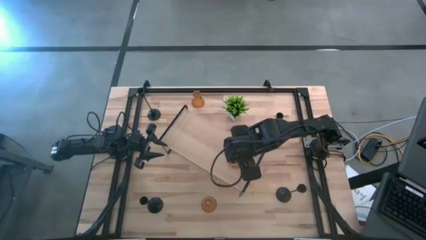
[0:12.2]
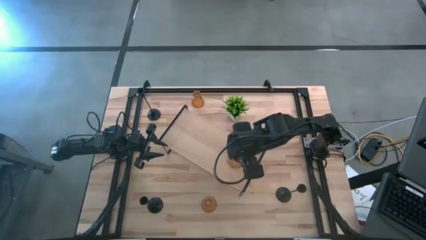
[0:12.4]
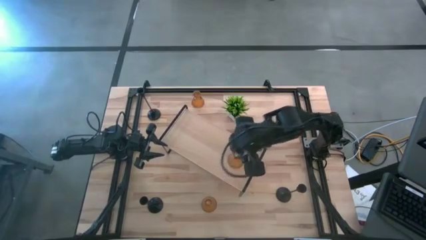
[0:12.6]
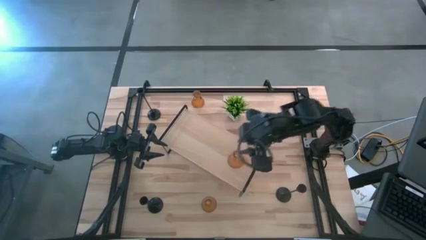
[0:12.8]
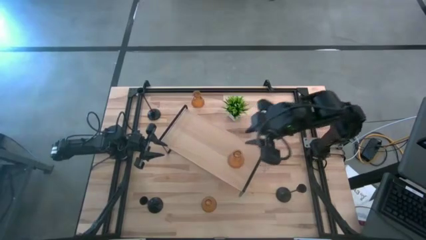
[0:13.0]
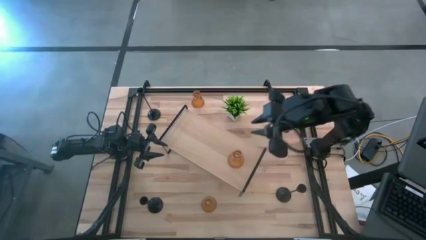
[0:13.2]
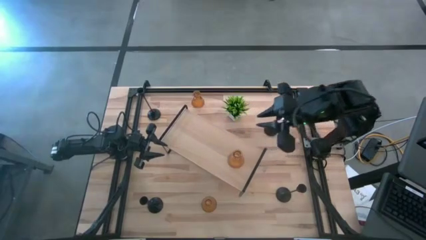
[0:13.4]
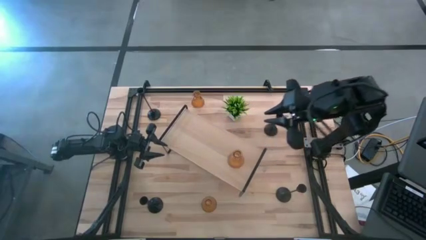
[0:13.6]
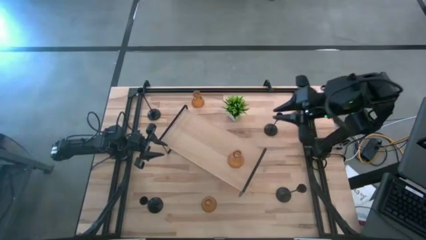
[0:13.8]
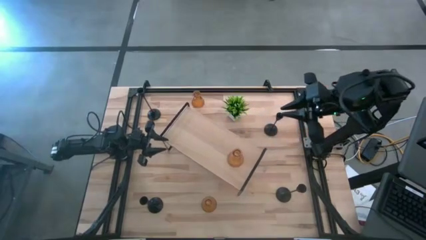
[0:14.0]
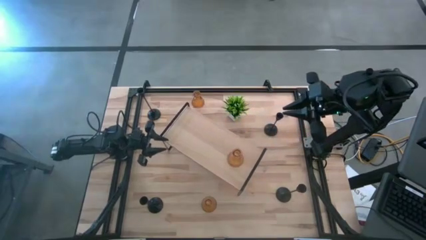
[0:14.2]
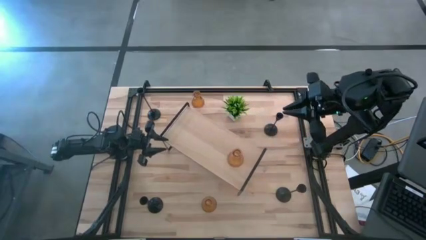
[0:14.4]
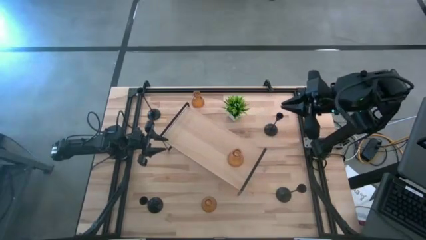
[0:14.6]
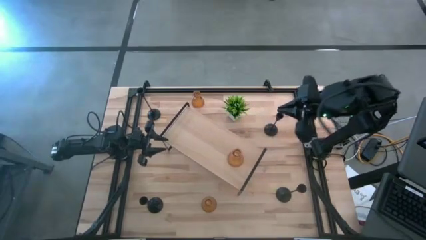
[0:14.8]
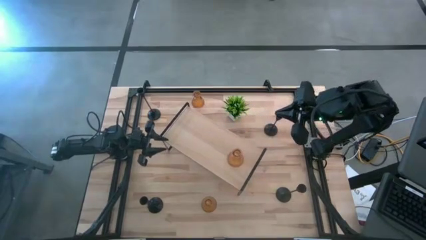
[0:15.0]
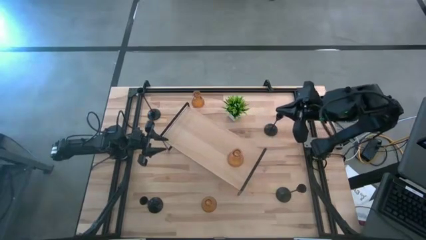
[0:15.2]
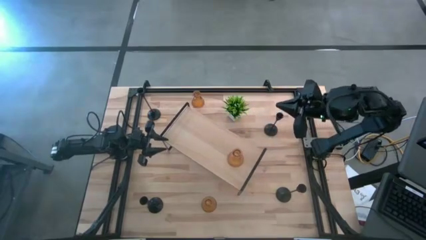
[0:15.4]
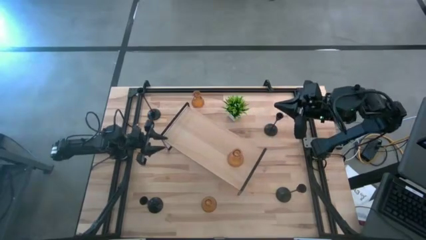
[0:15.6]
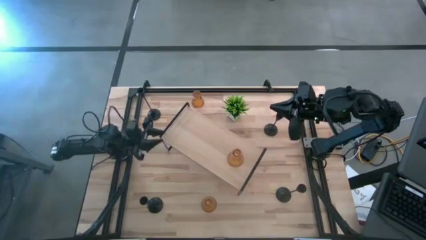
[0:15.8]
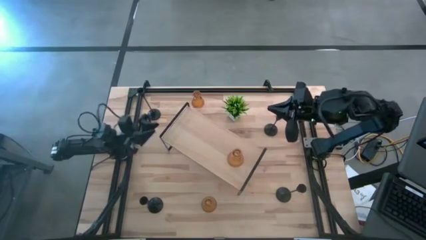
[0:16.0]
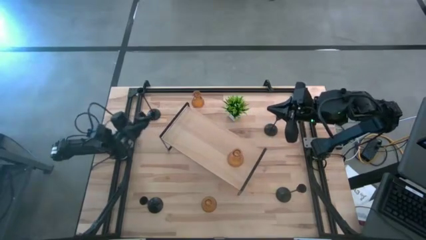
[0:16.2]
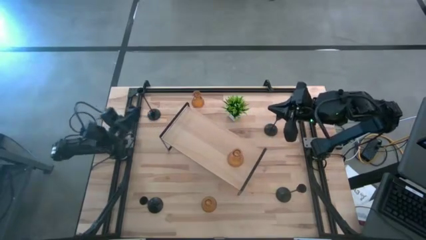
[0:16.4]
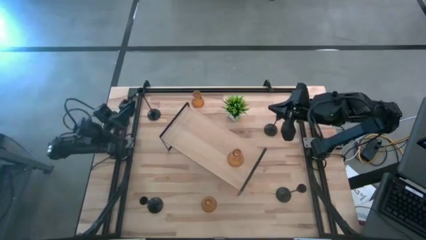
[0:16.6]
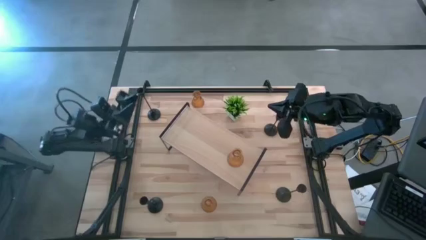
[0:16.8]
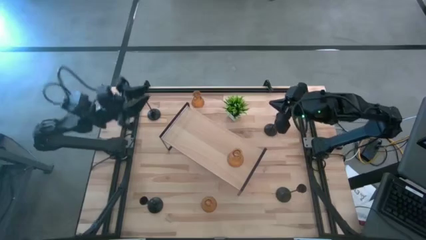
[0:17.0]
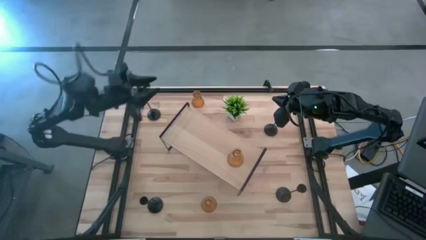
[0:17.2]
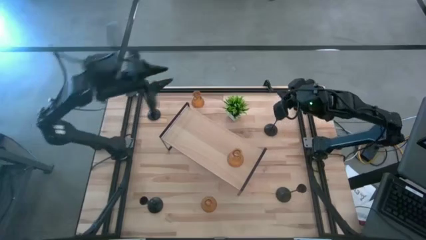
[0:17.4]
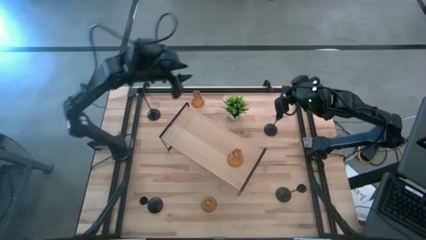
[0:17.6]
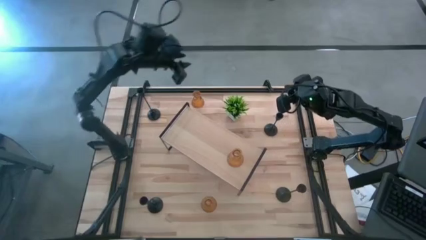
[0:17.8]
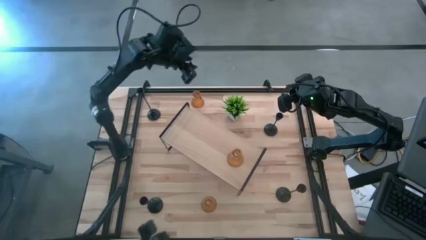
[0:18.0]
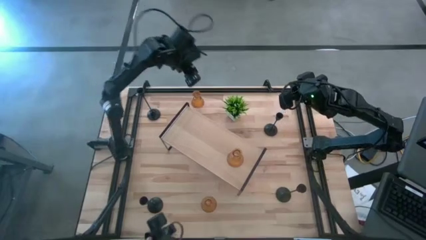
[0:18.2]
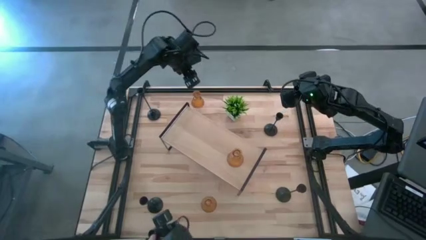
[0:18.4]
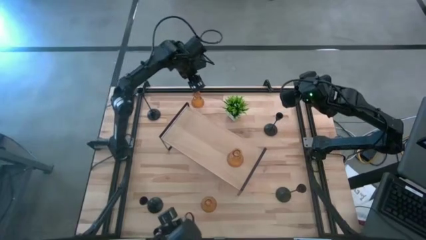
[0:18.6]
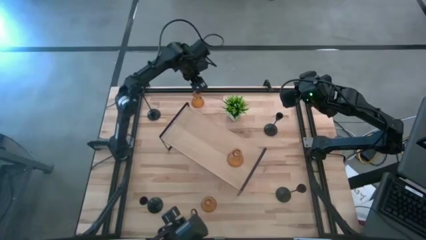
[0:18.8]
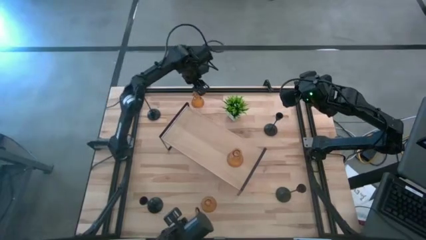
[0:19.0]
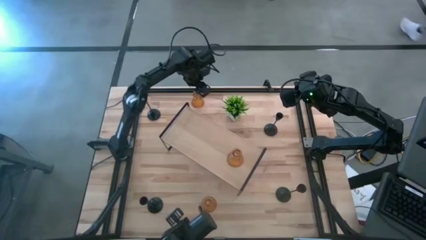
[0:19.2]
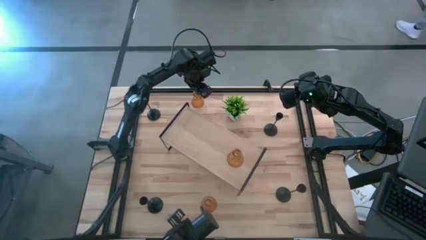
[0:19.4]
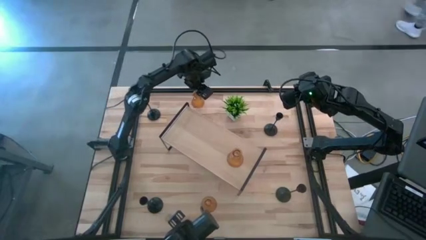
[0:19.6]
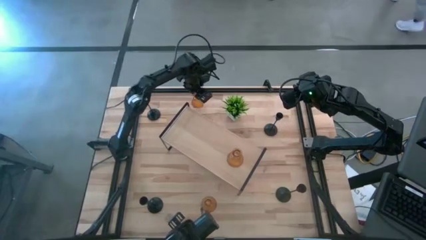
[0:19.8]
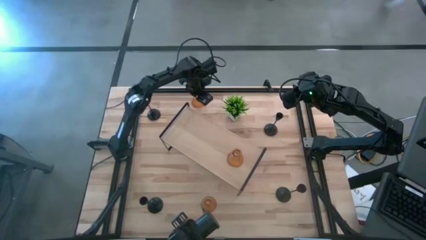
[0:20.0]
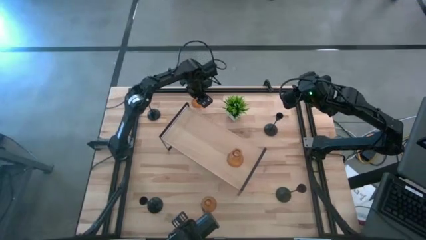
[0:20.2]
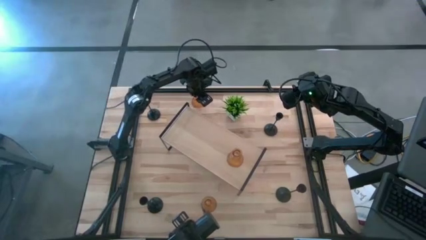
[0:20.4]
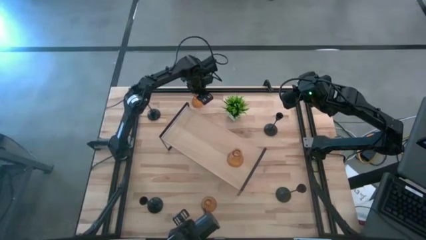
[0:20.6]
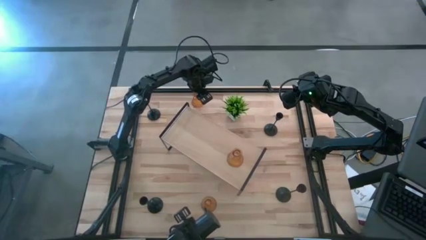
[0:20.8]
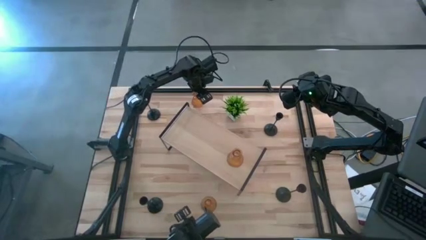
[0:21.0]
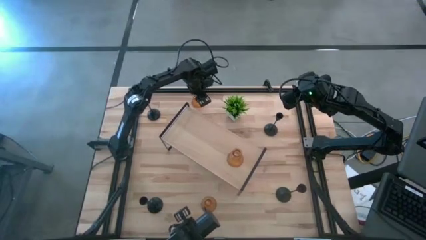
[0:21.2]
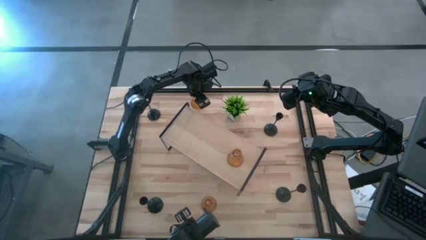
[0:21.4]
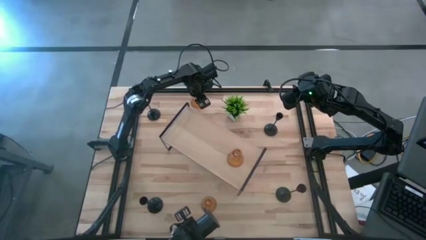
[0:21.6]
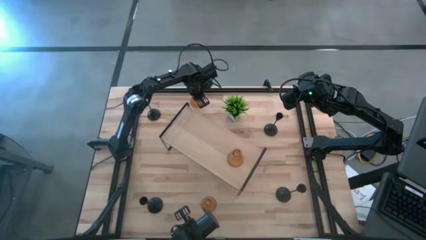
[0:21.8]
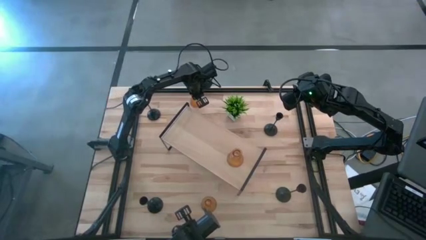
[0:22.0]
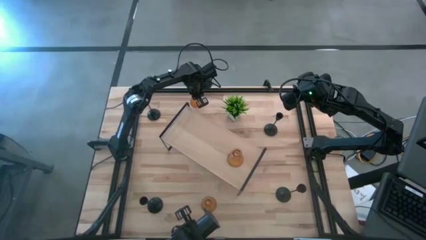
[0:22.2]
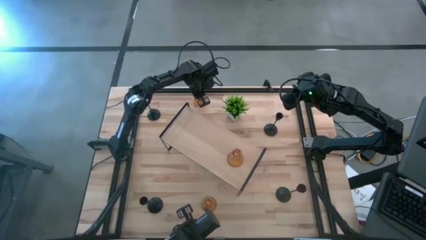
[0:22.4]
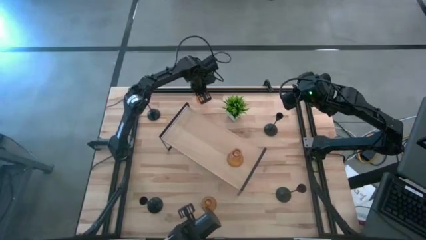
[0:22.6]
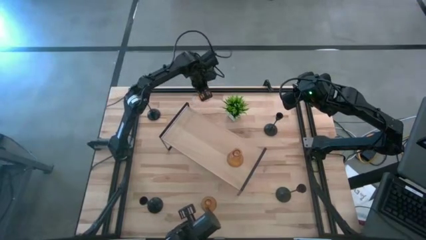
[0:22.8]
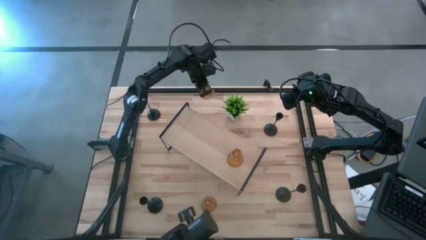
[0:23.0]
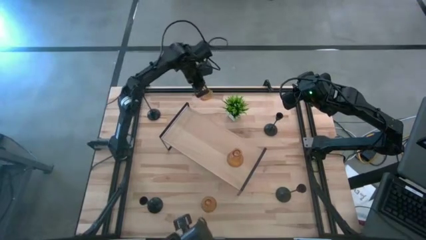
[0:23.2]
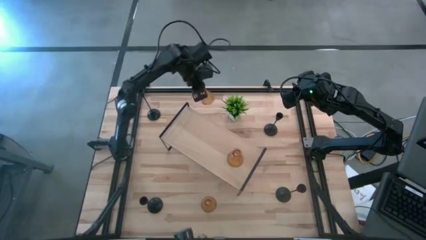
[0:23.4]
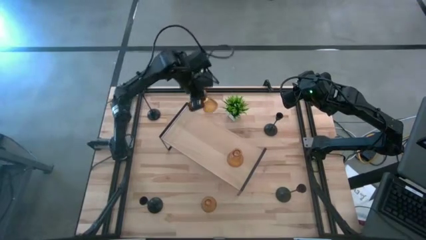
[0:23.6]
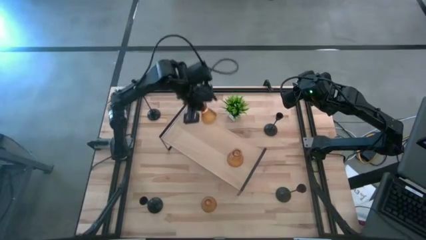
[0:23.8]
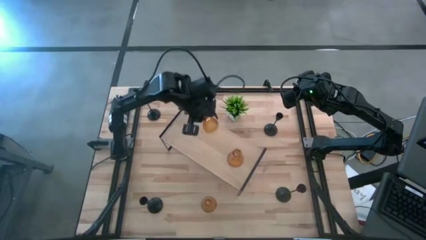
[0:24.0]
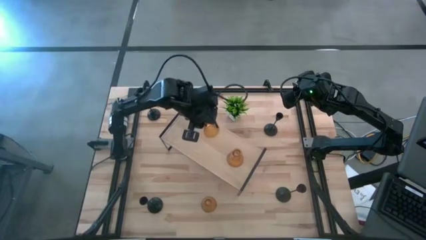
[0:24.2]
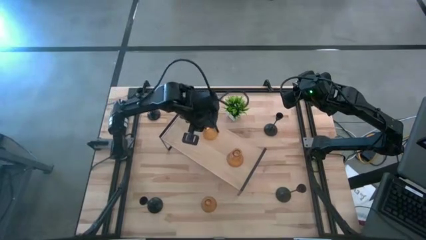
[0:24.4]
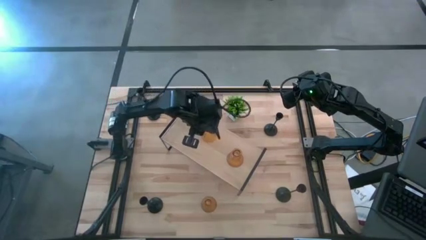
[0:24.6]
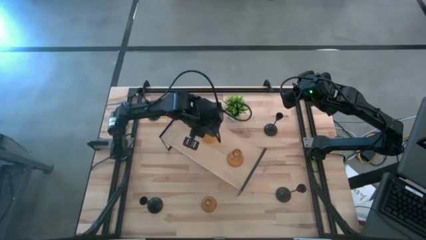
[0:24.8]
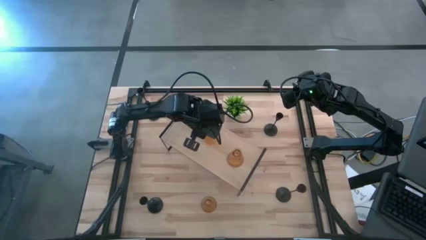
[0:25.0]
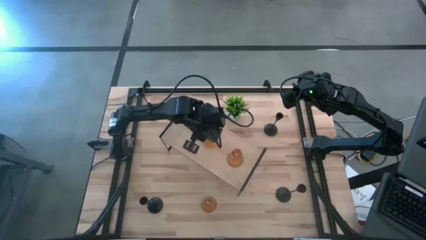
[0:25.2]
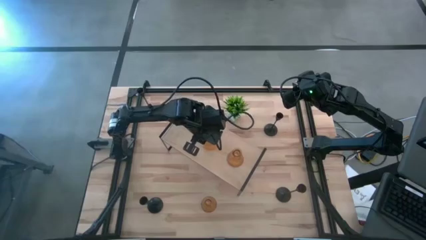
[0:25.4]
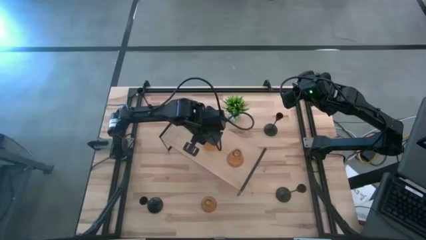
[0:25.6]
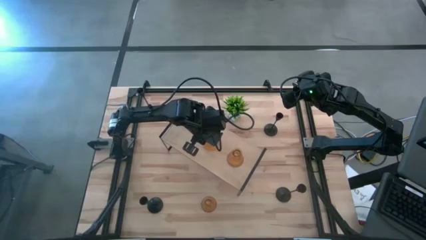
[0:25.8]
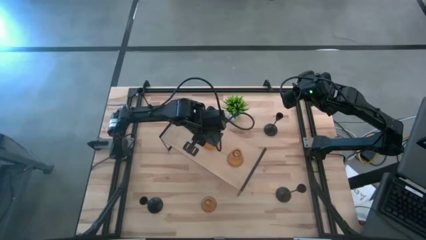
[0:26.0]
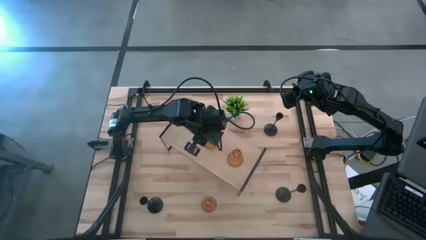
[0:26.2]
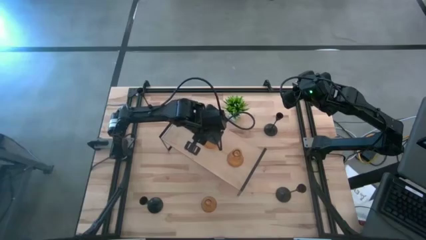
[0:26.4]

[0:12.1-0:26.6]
Task: Pick & Place candle stick holders
Put the orange candle holder on the shelf
